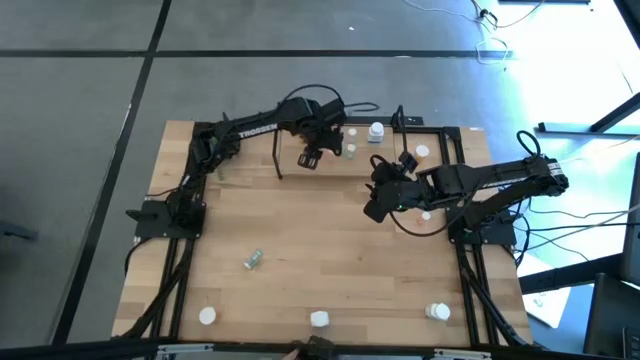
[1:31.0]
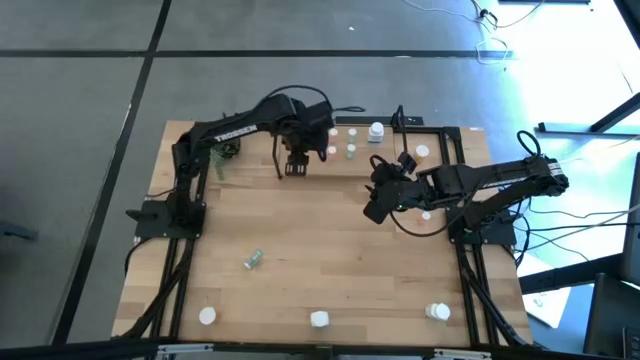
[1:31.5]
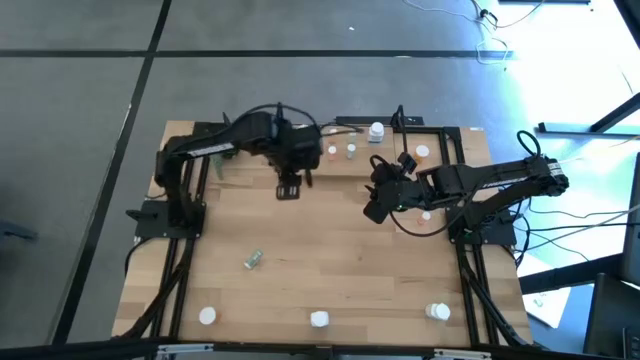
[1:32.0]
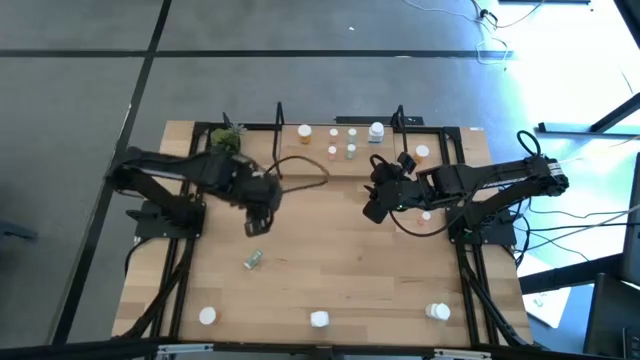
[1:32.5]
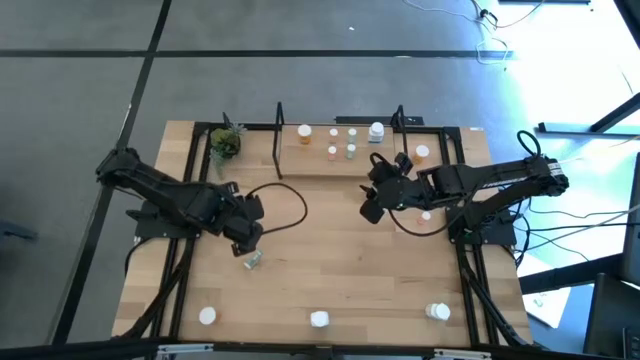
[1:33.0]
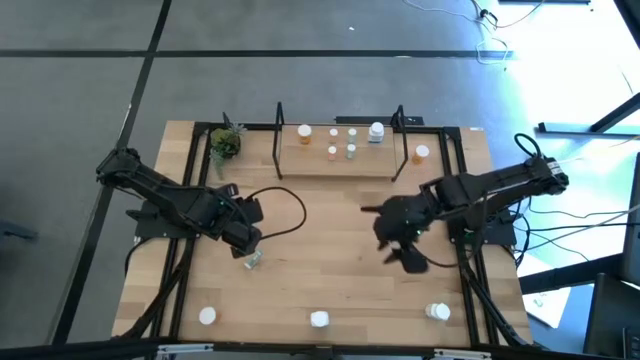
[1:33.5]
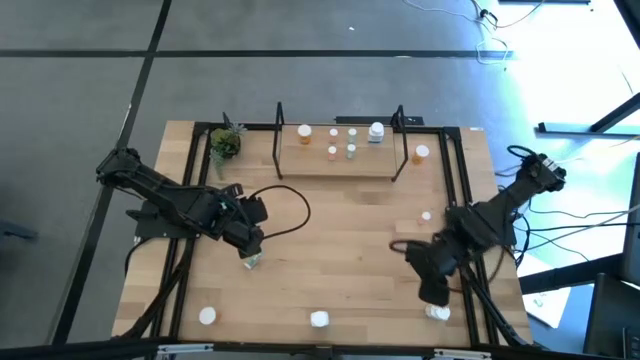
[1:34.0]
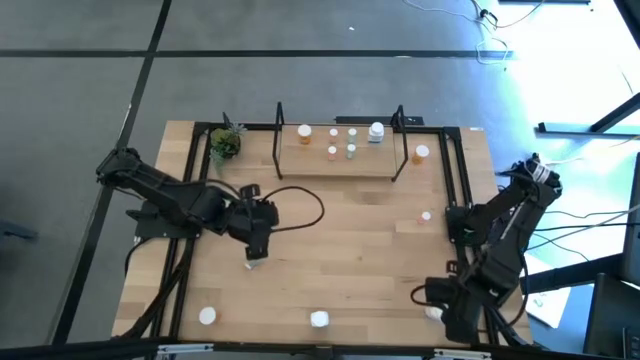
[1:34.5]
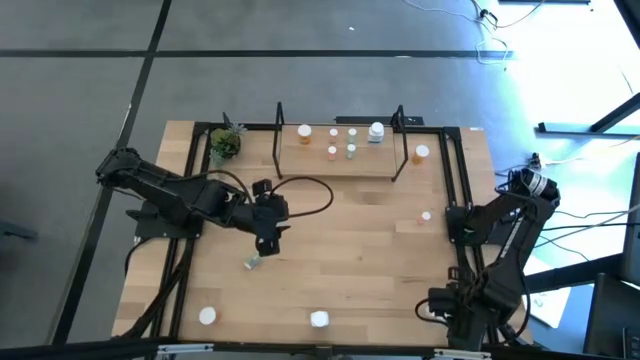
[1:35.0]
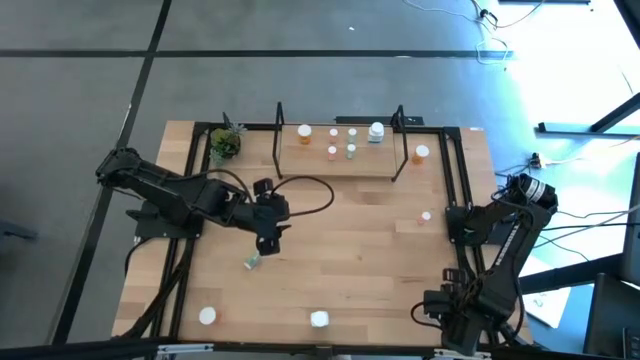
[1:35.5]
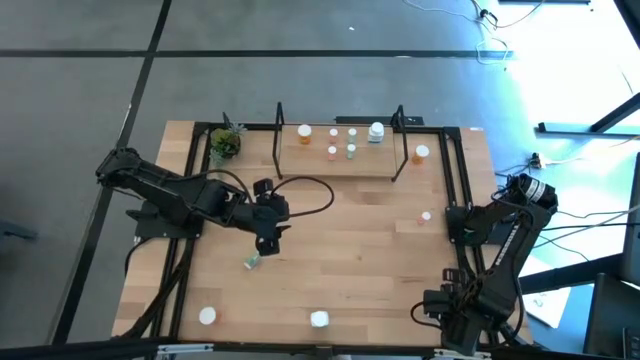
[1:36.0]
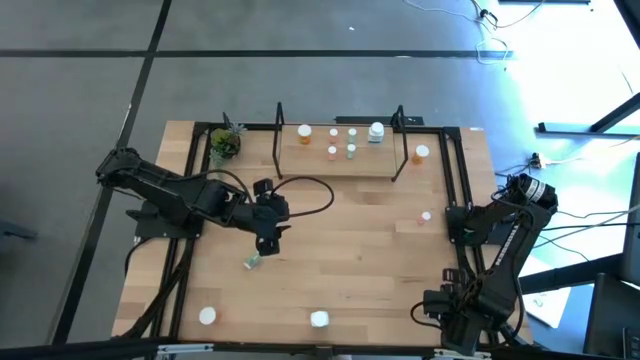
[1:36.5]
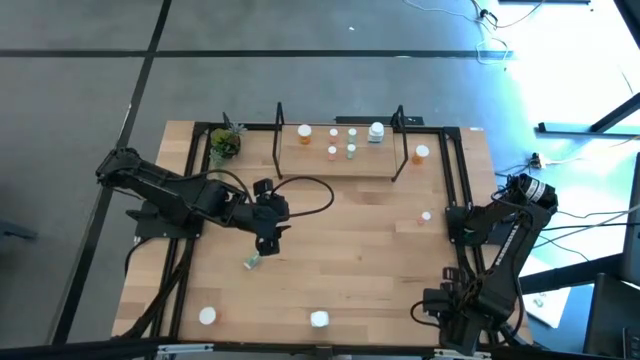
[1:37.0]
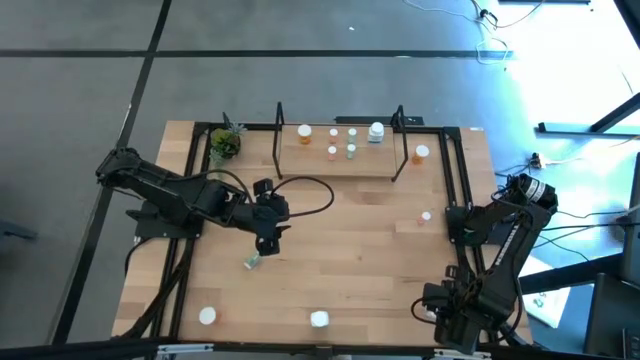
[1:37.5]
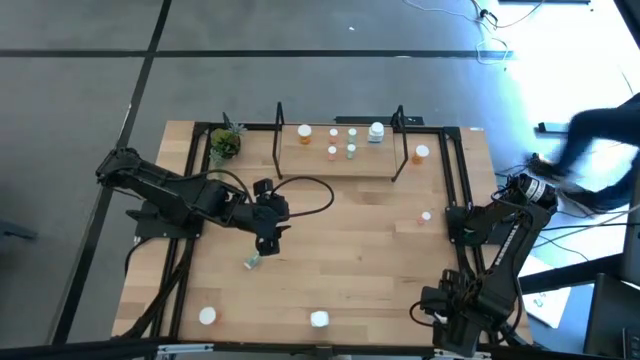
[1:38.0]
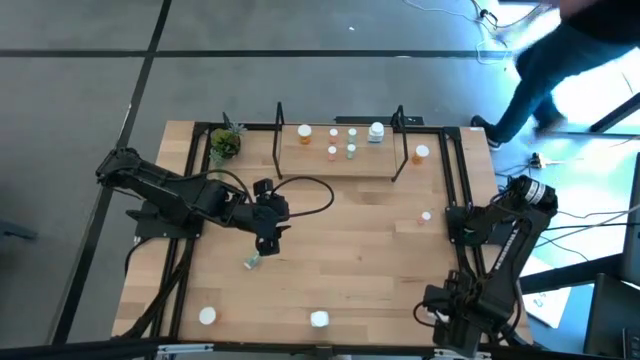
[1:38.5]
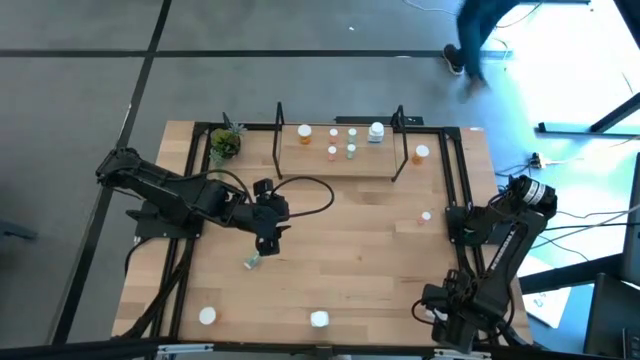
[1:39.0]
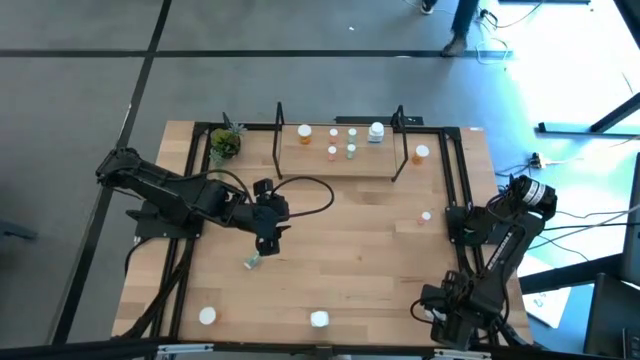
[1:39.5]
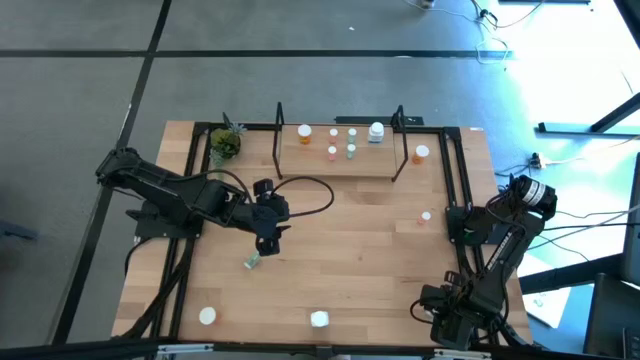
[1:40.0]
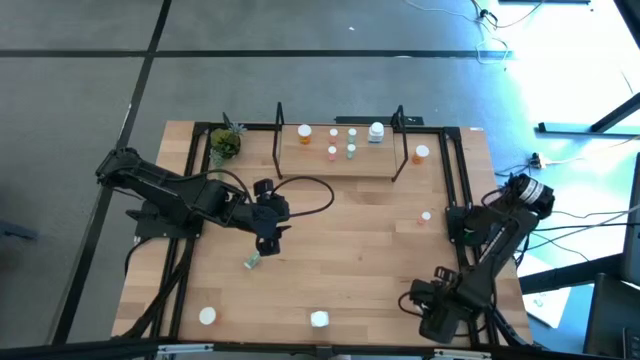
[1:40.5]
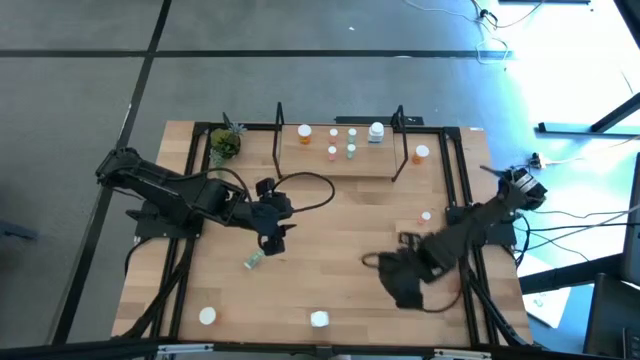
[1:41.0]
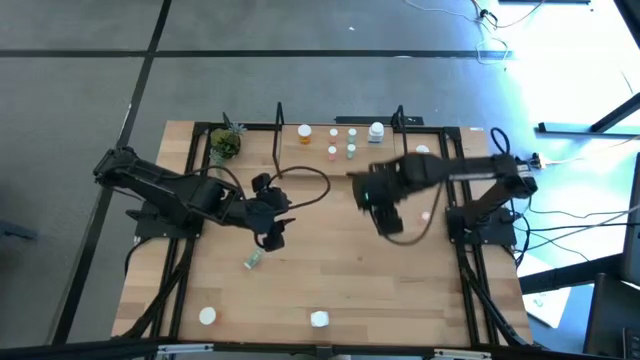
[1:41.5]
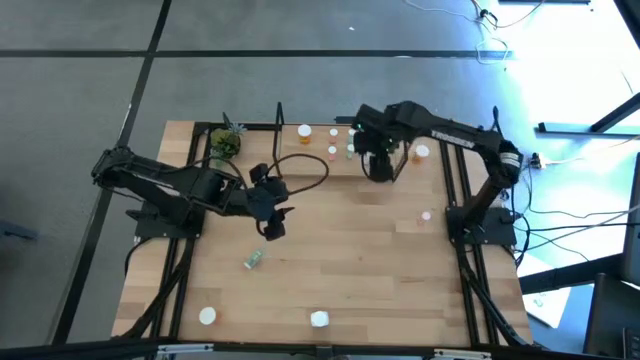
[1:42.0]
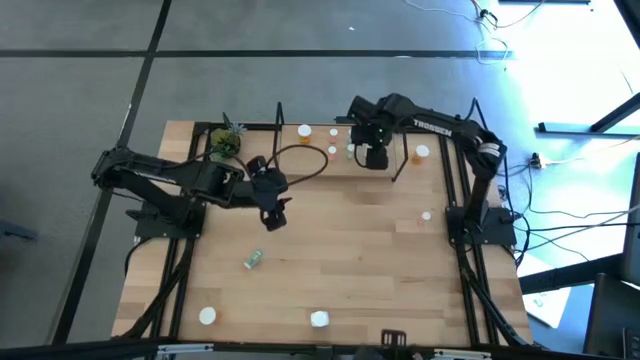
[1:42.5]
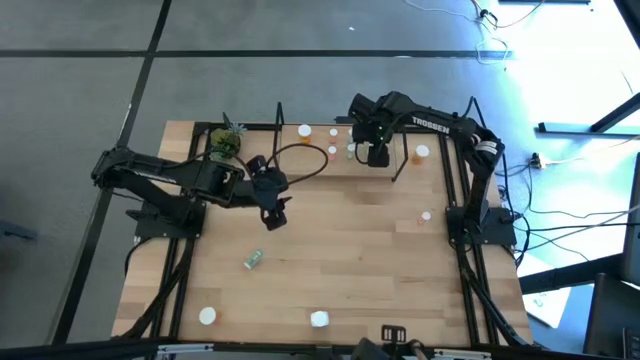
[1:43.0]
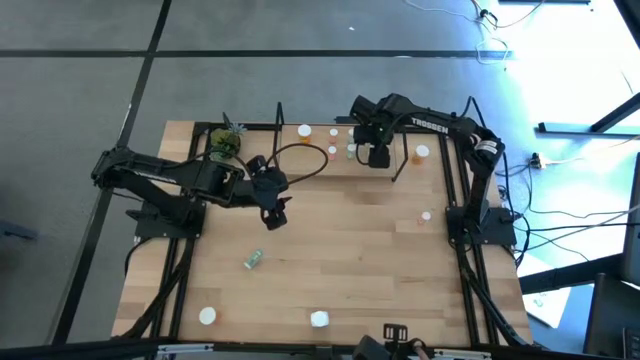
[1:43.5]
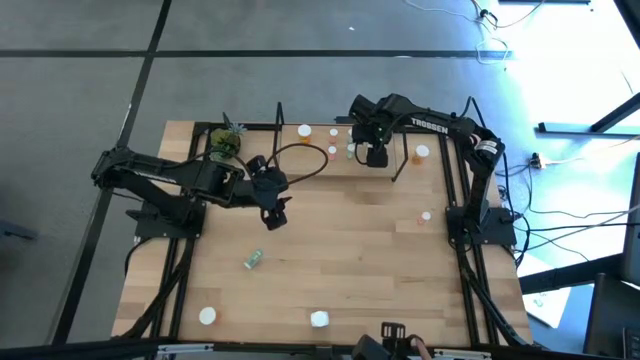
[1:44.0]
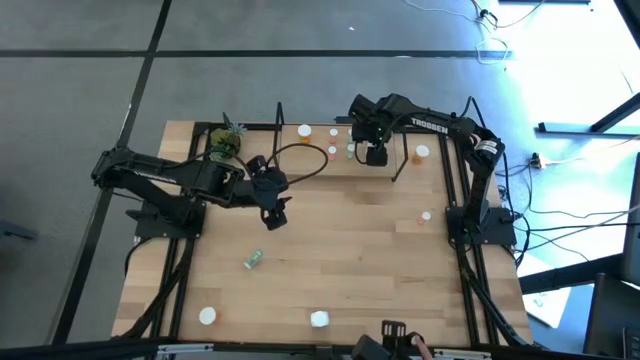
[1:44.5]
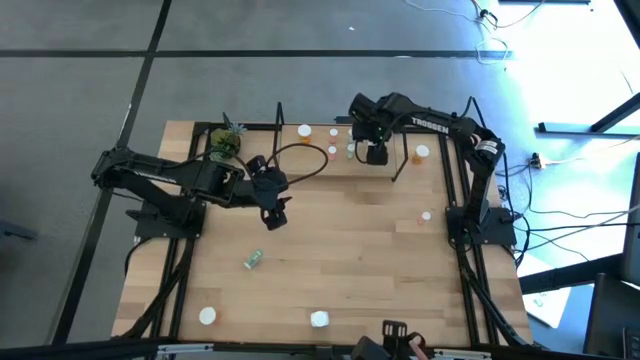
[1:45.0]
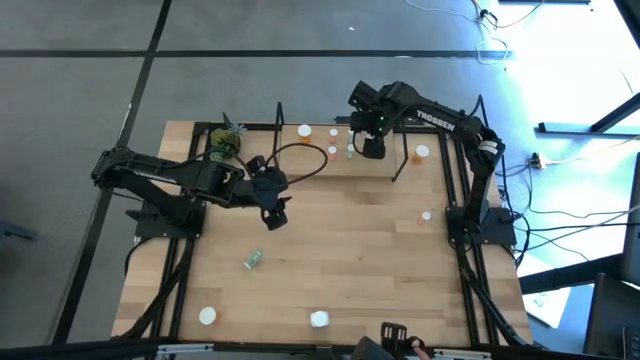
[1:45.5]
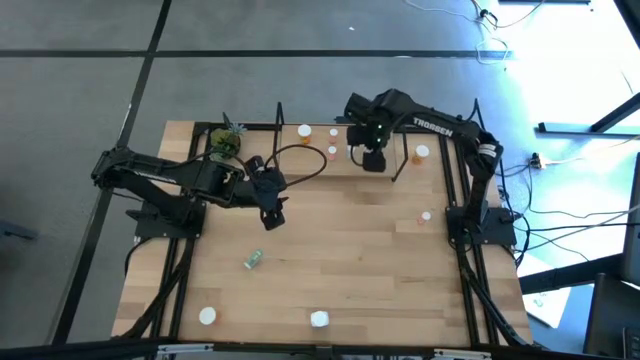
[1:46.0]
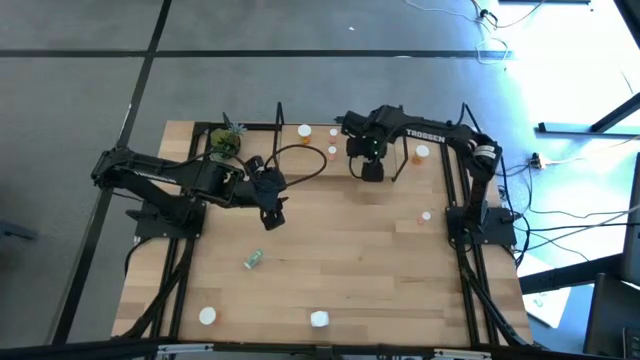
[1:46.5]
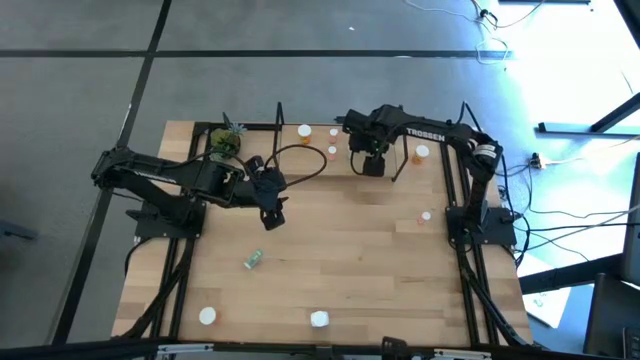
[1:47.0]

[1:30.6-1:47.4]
Task: Pick and place medicine bottles onto shelf by color
Put the right white pill bottle on the shelf aligned with the white bottle

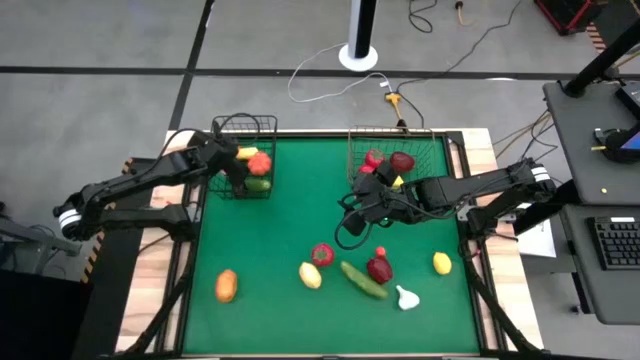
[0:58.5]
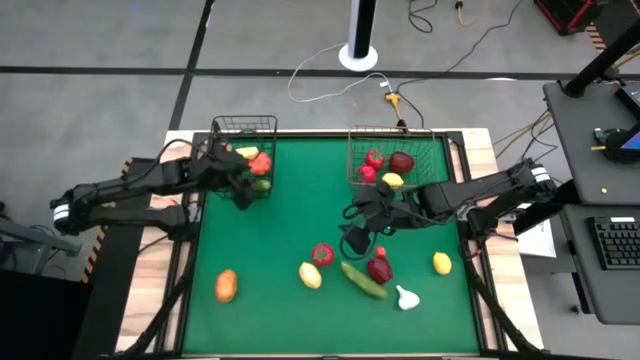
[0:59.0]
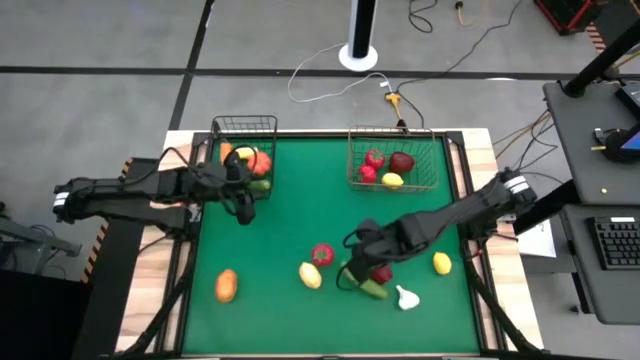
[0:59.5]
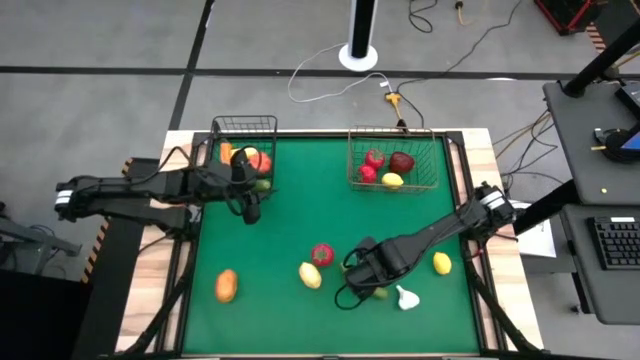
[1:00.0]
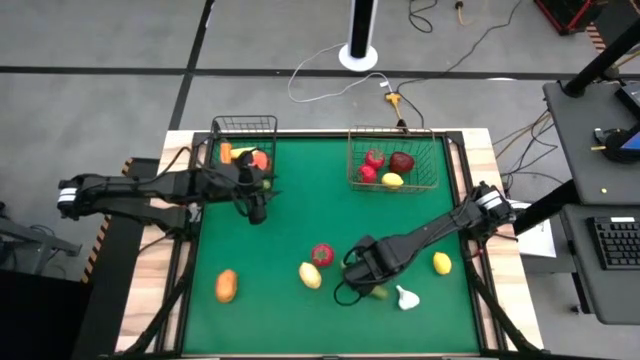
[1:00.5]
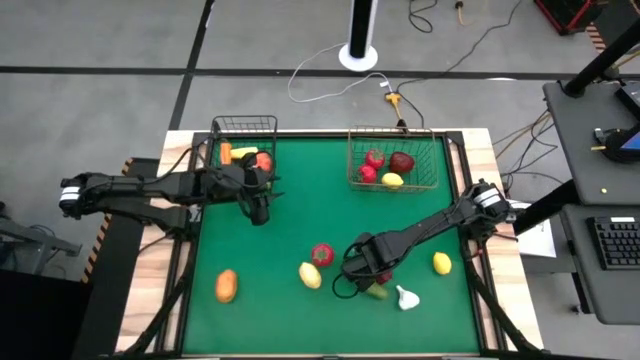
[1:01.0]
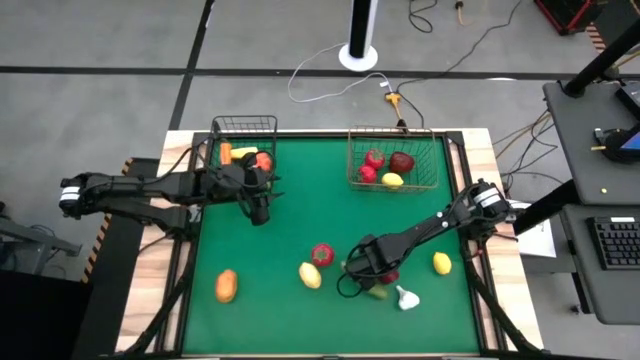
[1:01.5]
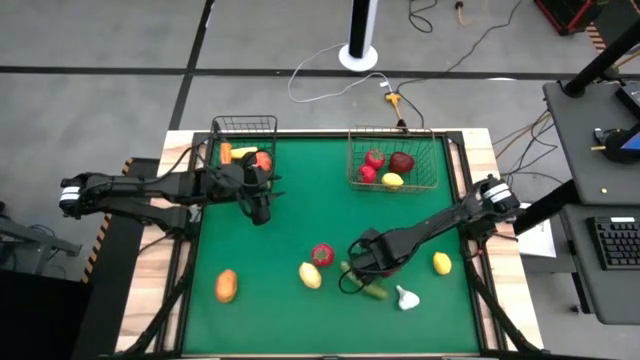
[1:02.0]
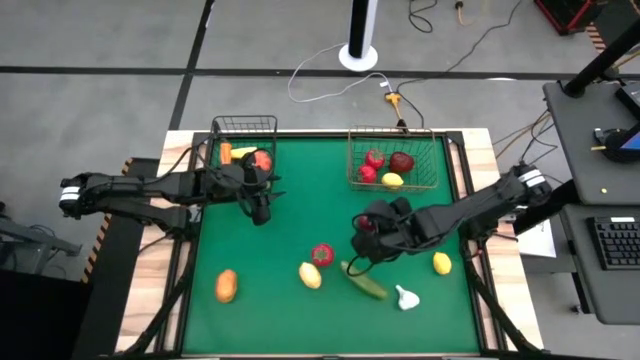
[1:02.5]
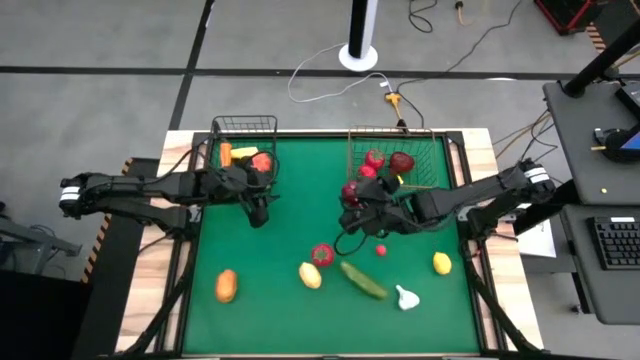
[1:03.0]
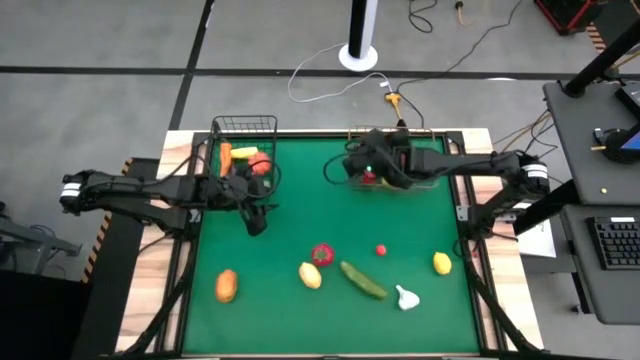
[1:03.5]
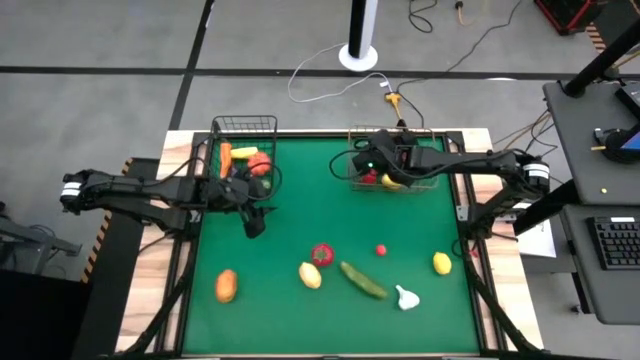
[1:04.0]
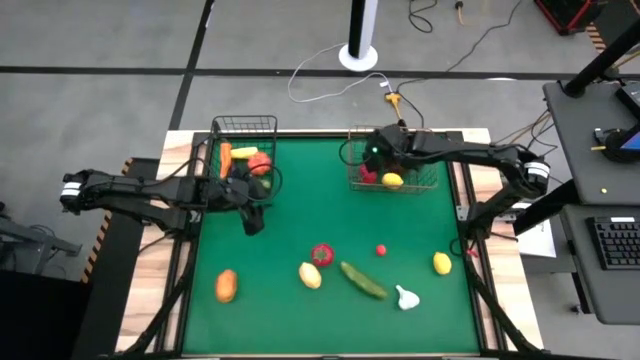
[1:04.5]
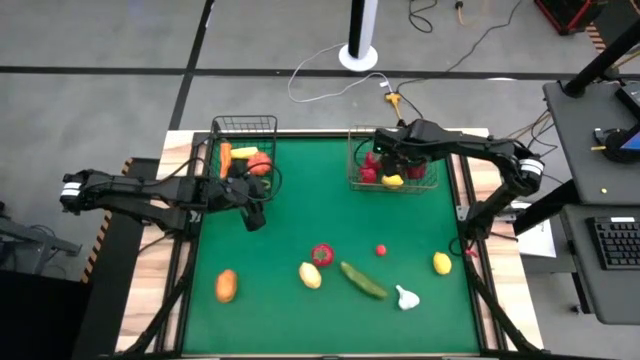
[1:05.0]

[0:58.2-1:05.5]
Task: Sort produce into baskets
Put the red apple into the right wire basket
